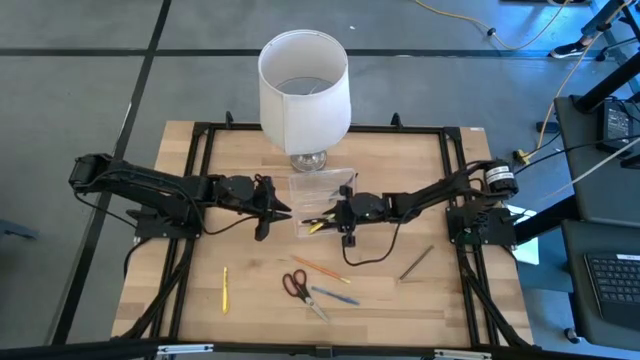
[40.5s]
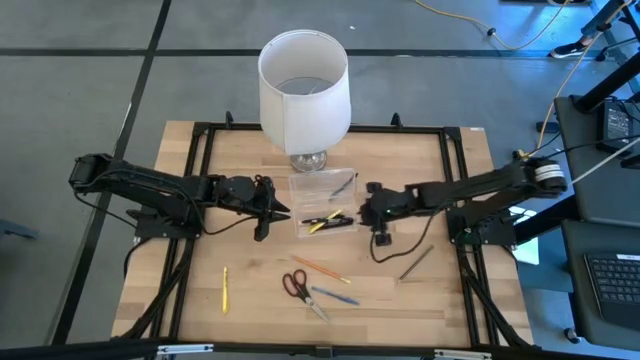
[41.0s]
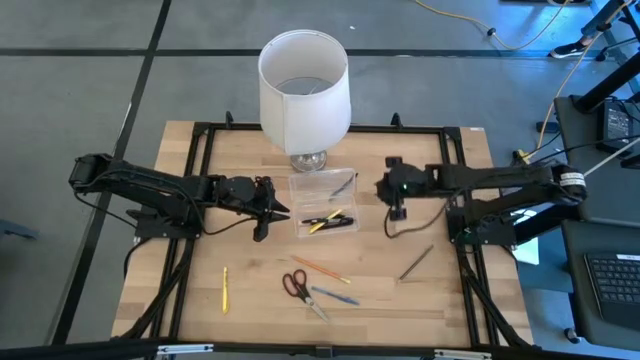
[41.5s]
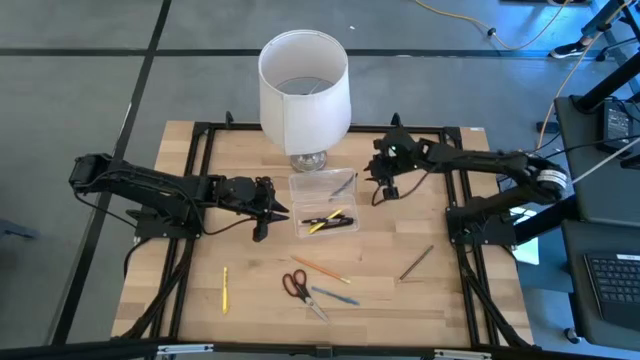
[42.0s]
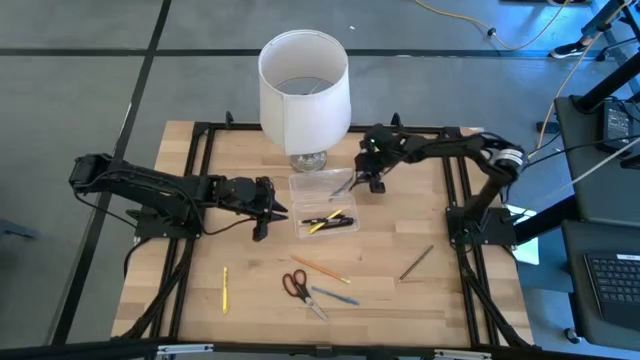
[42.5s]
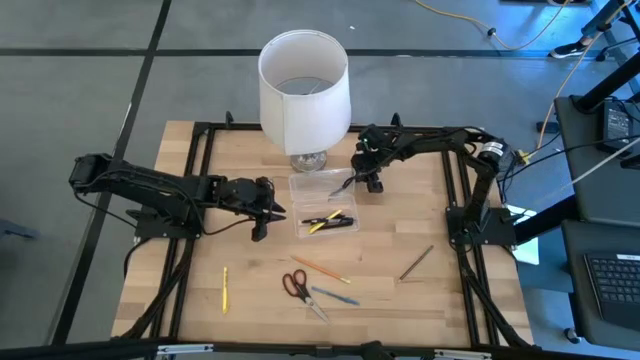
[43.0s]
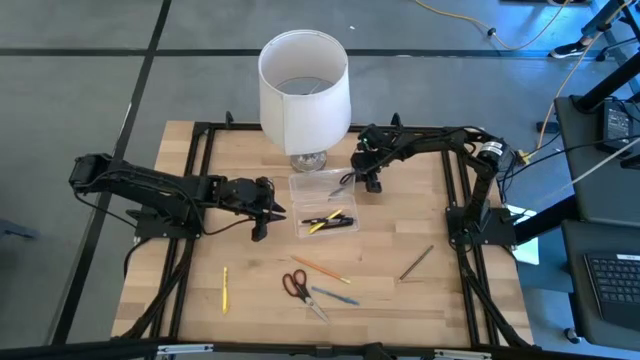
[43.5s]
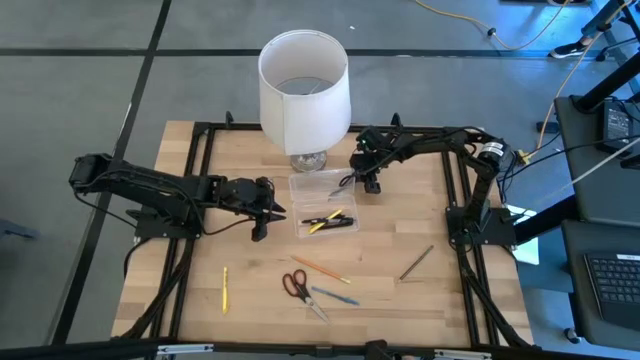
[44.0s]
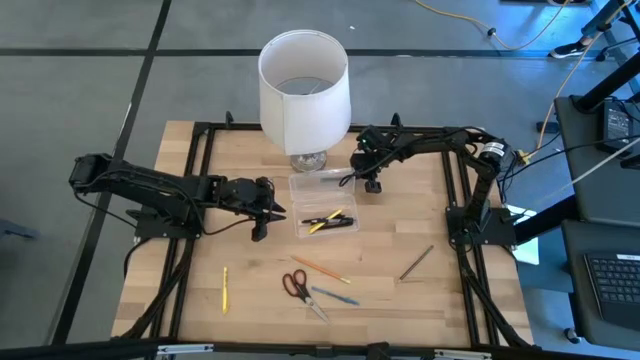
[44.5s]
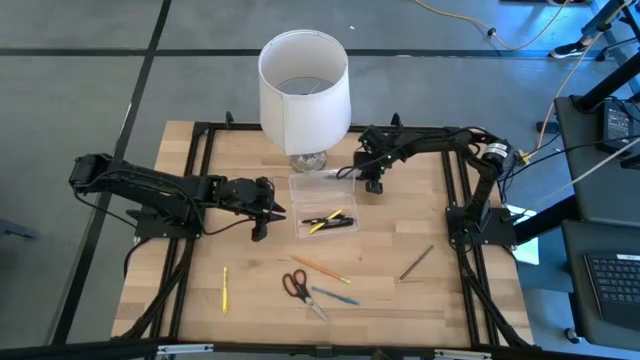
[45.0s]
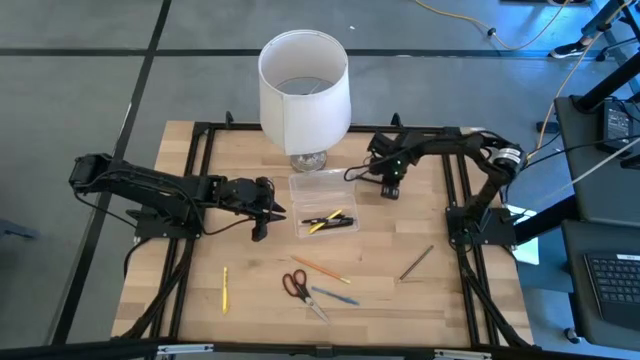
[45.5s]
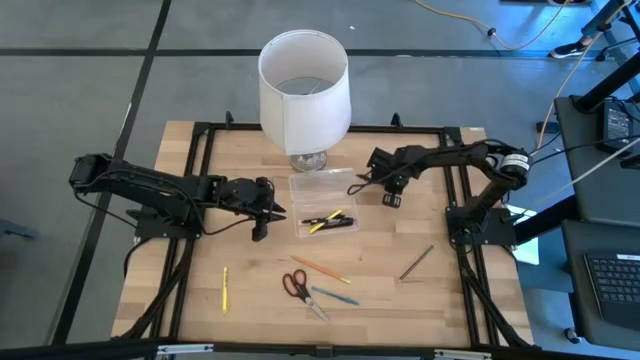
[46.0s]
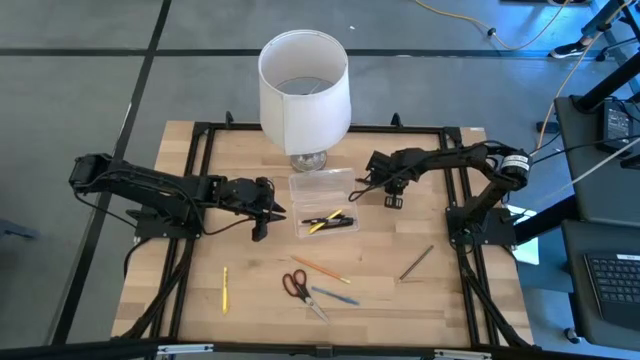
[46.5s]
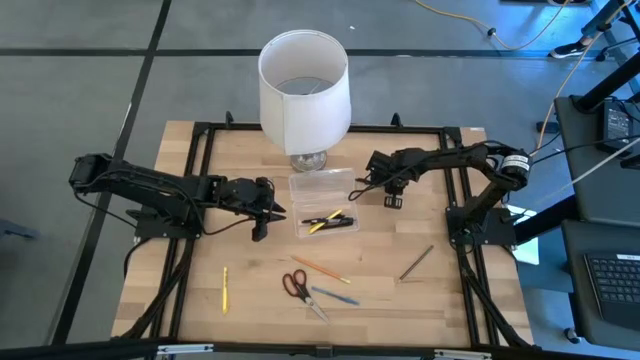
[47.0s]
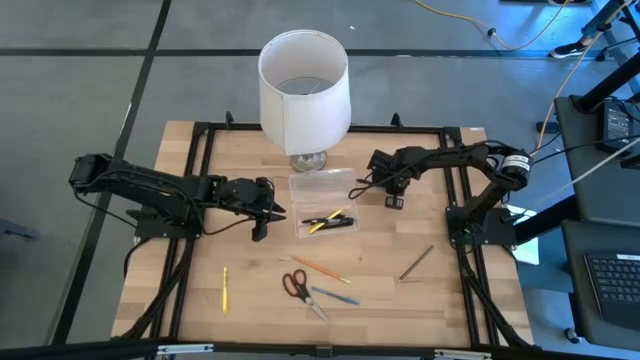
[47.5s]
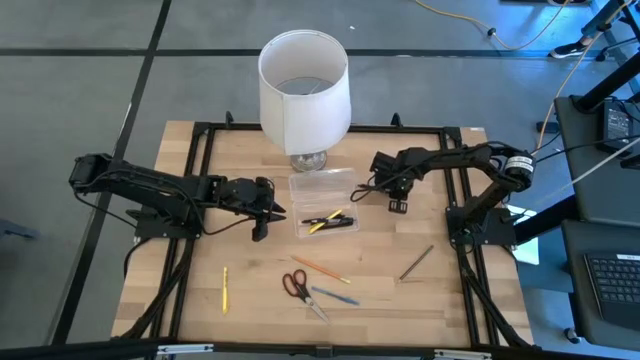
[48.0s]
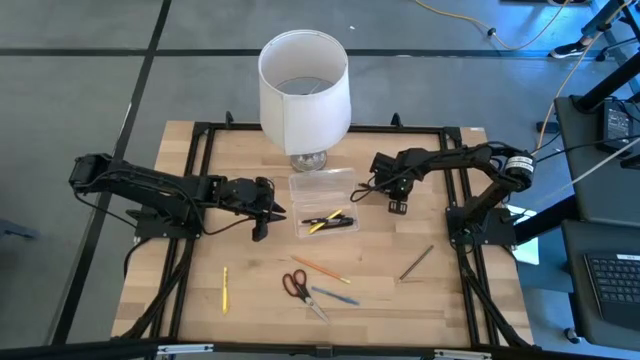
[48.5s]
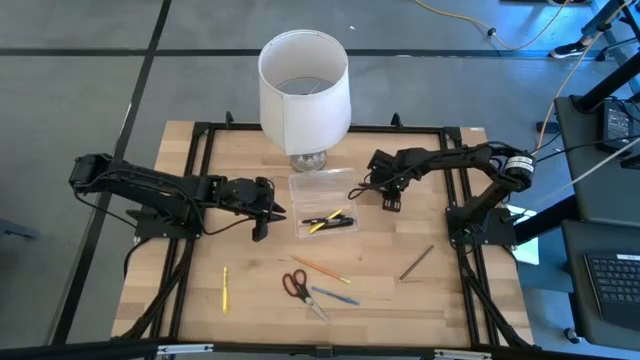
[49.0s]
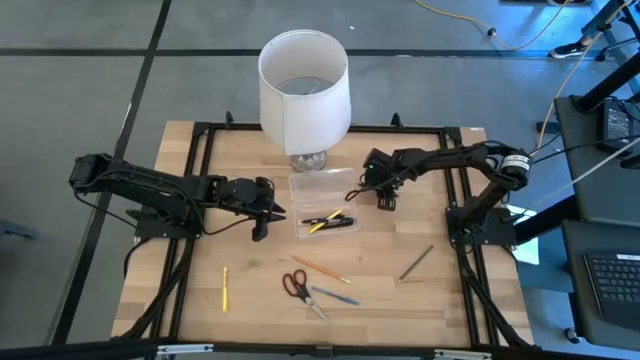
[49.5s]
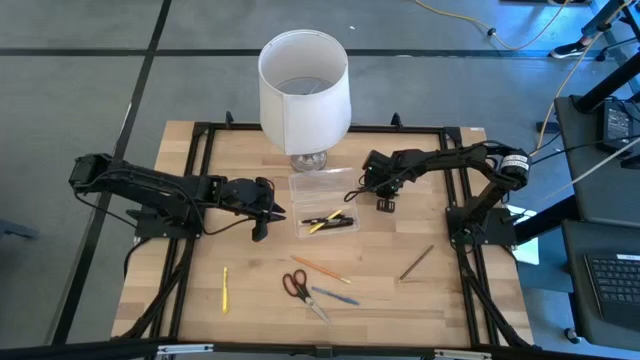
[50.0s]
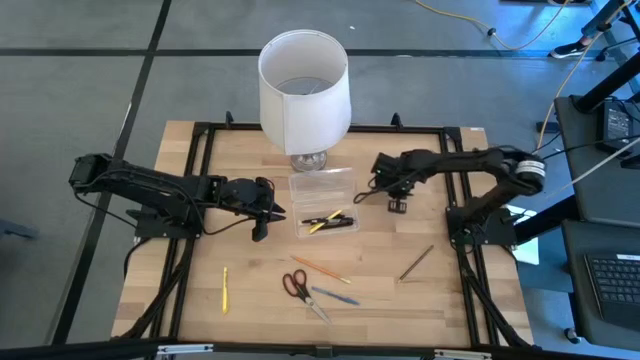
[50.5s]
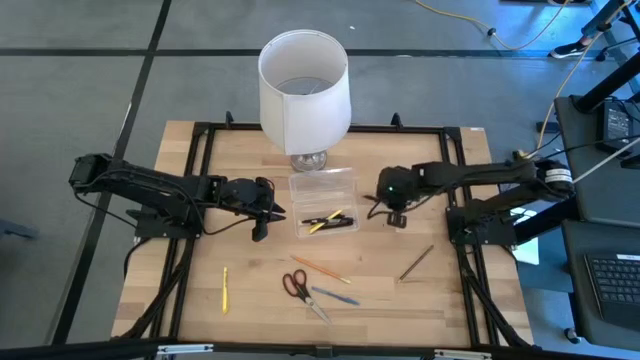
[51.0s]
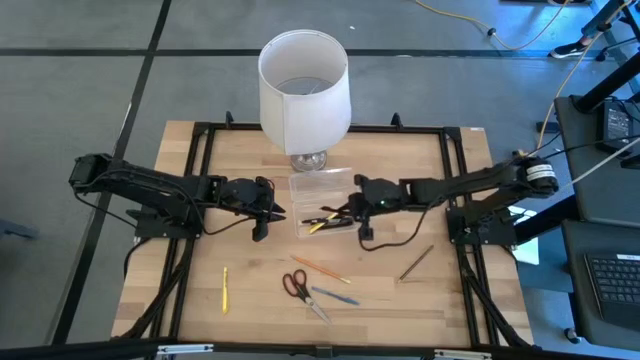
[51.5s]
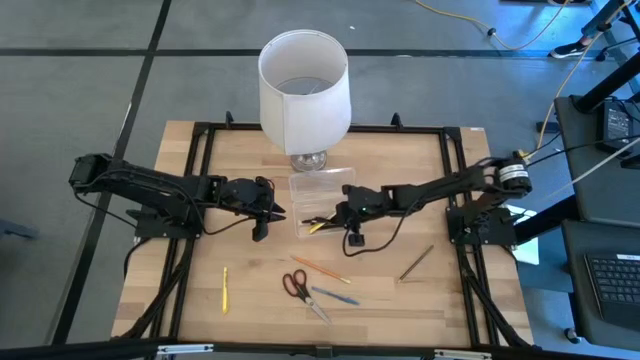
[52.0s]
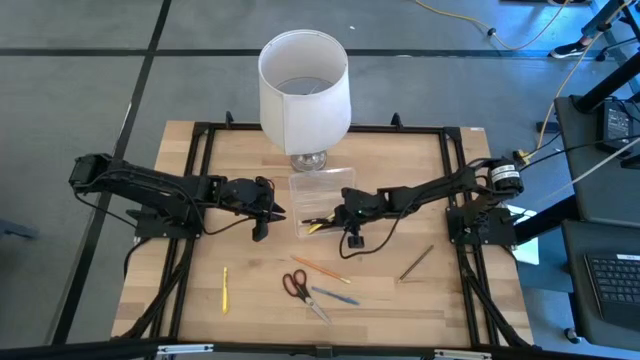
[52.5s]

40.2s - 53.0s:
Task: Pick & place school supplies into a supply box
Put the black pen into the transparent supply box
